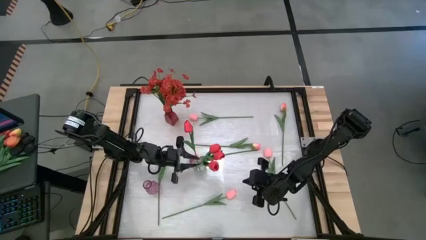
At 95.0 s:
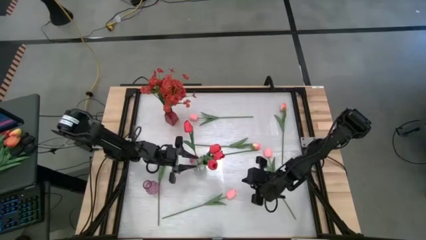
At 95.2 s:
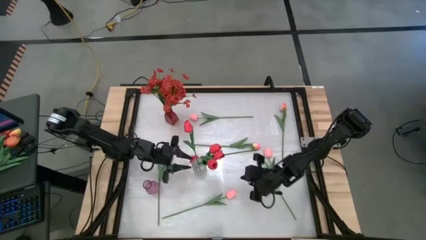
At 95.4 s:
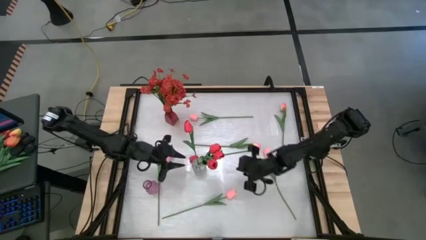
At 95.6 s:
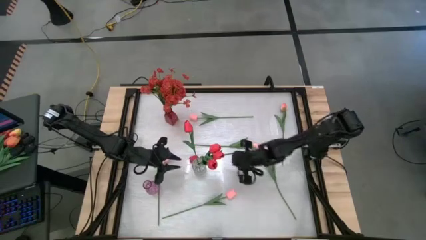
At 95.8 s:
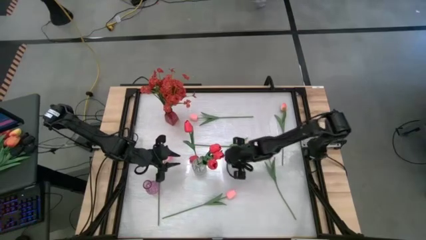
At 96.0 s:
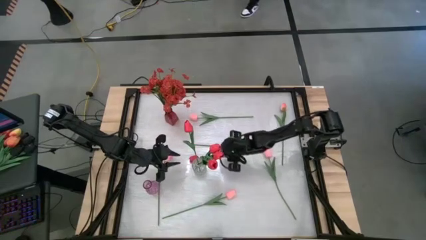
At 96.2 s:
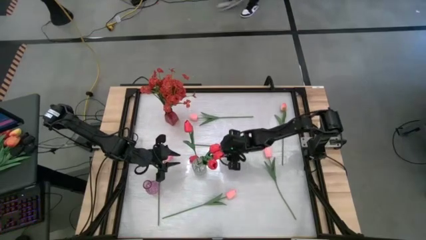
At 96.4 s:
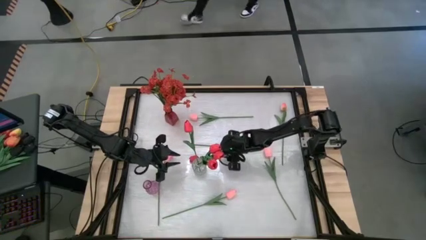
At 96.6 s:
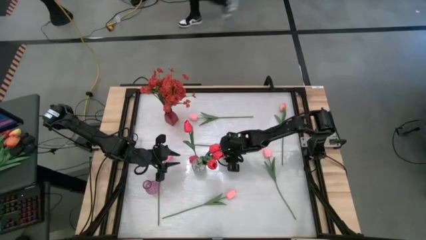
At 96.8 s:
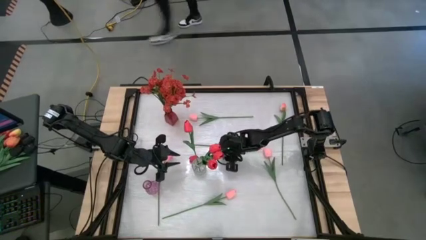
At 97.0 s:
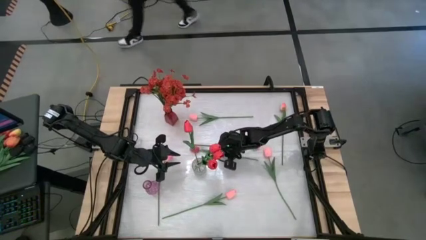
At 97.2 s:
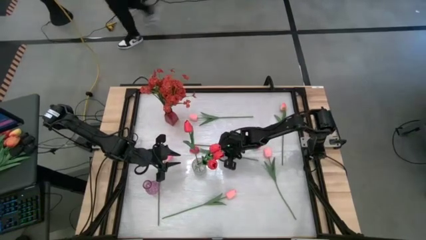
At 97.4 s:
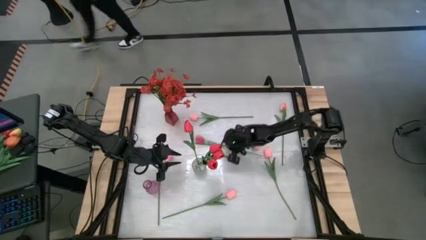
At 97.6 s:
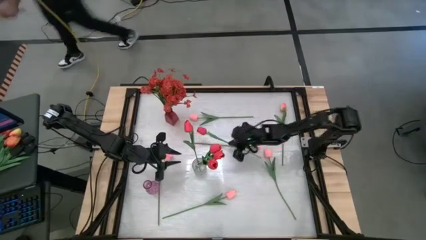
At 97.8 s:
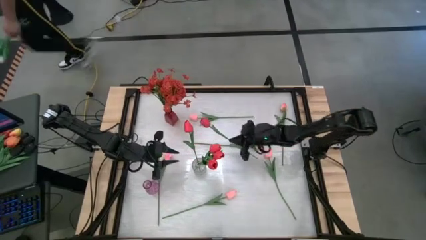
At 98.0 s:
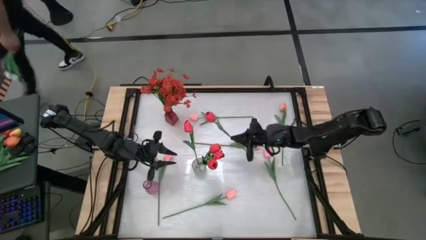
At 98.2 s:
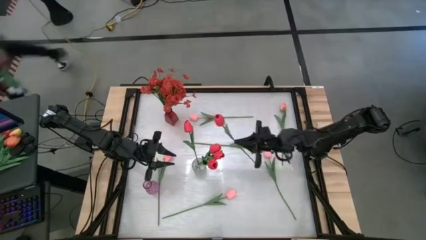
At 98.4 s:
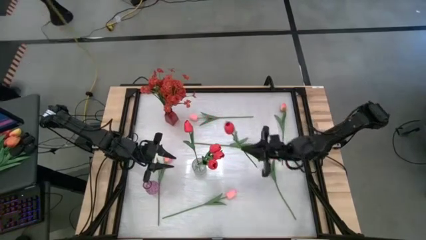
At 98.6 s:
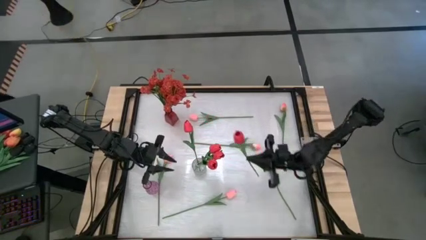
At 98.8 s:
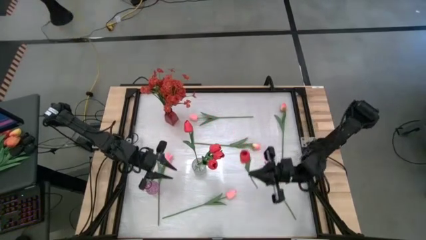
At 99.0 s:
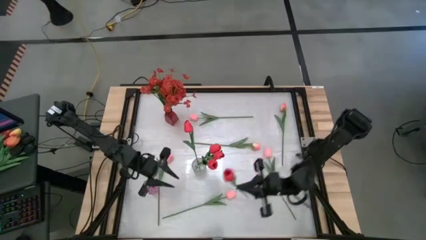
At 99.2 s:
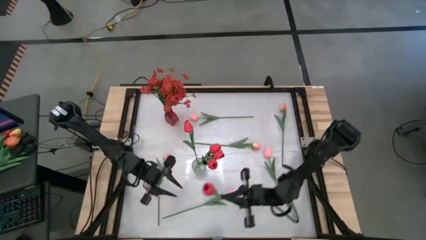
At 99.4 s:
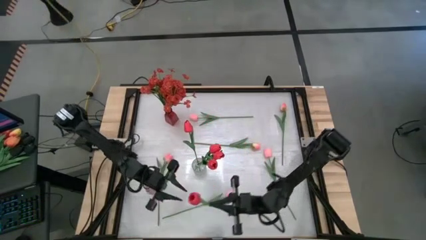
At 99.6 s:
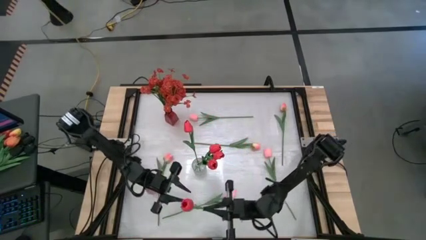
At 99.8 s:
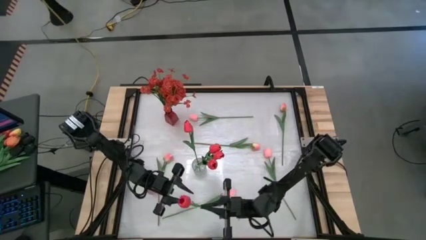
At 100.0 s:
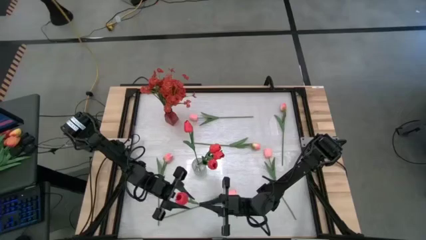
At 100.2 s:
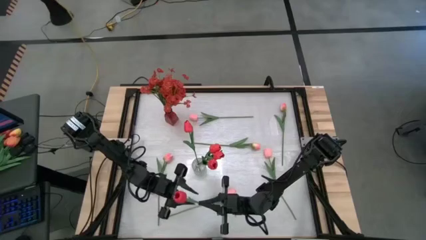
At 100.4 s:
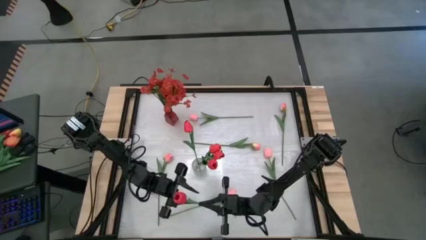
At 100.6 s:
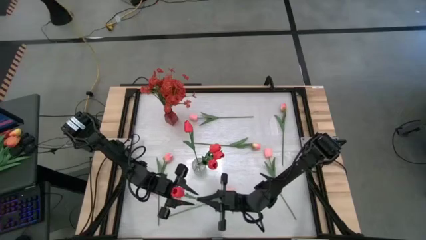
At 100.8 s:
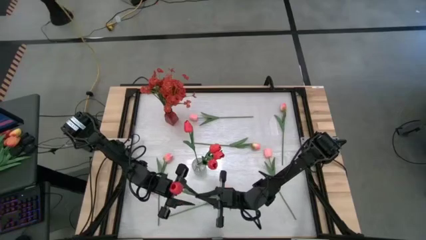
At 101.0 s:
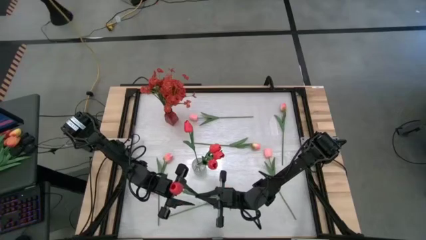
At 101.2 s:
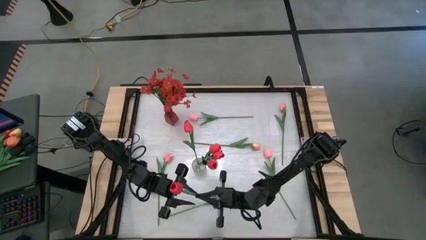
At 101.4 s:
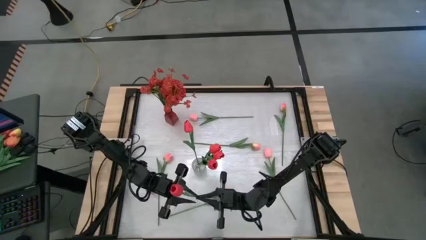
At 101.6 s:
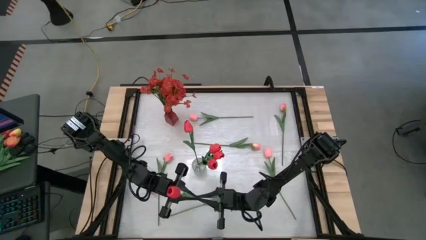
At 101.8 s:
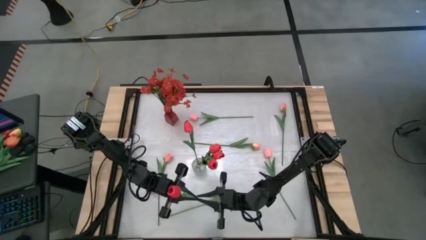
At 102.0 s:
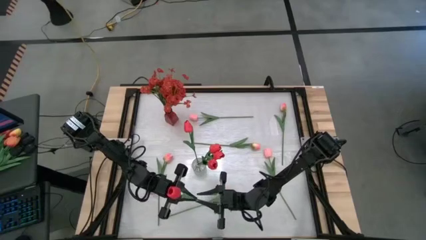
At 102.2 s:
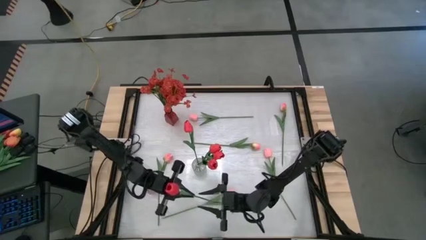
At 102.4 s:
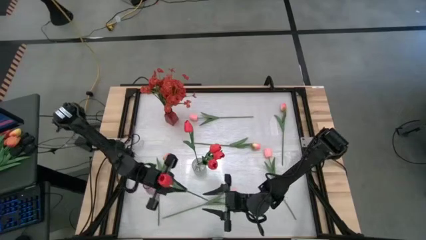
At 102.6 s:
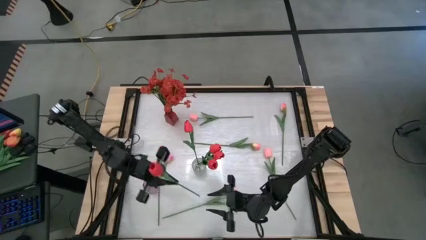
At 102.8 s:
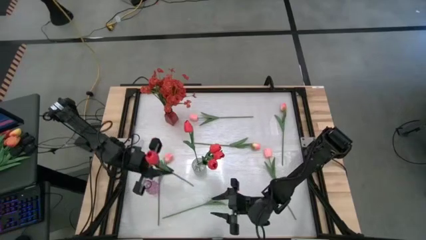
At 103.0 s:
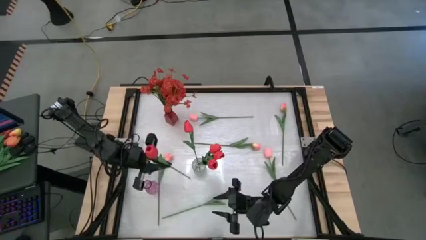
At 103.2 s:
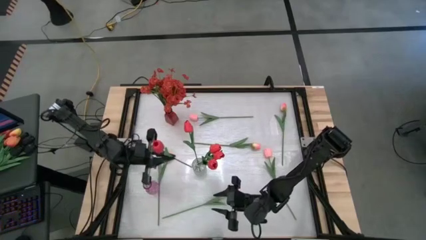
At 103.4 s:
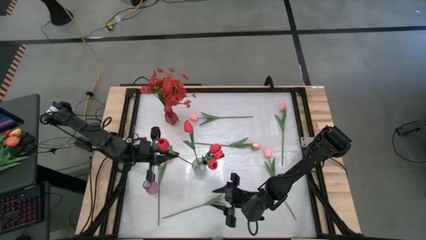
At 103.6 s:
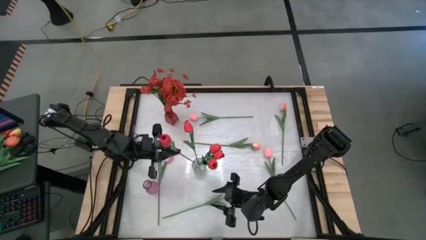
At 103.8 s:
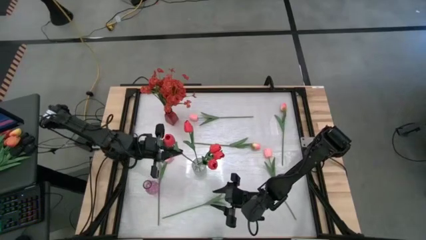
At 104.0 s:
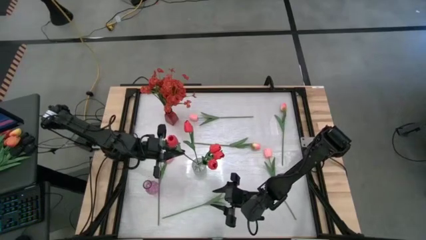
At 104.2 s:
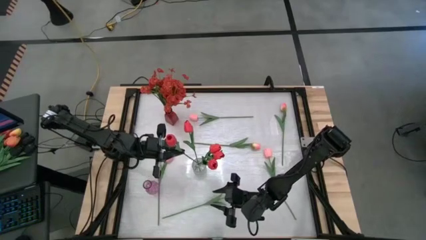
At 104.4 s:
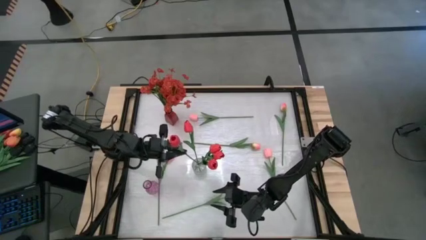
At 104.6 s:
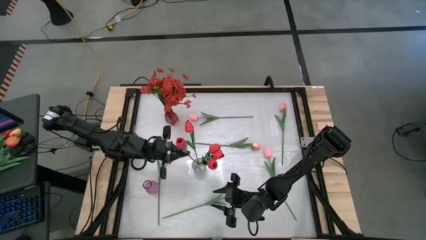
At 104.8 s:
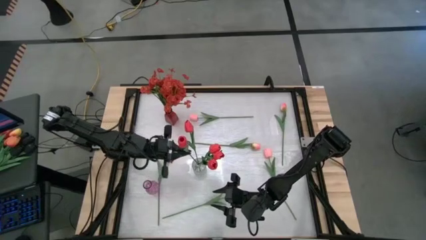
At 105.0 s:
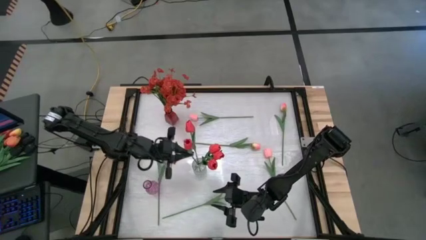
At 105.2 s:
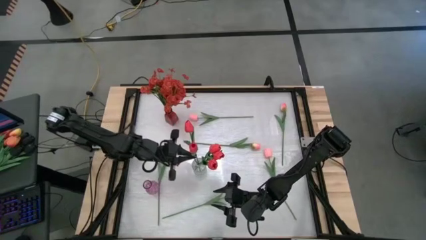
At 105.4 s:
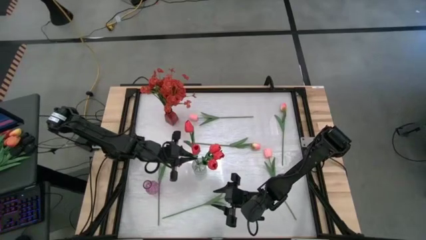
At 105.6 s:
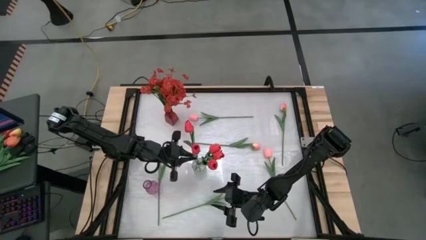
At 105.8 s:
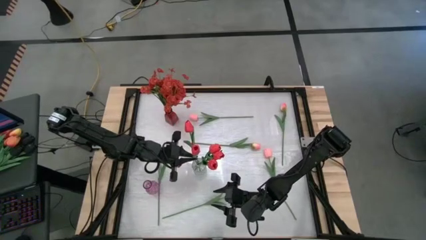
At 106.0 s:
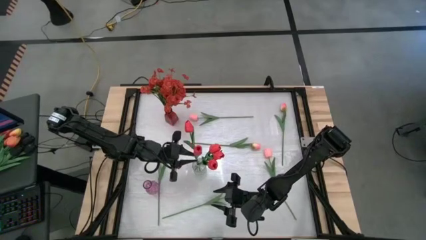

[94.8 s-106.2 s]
Task: Sort flowers into vase by color
Put the red flower into the transparent vase
